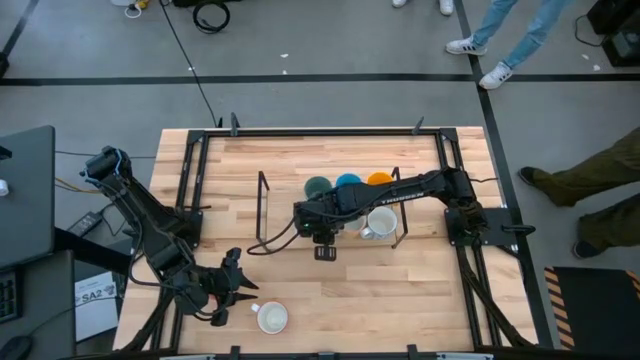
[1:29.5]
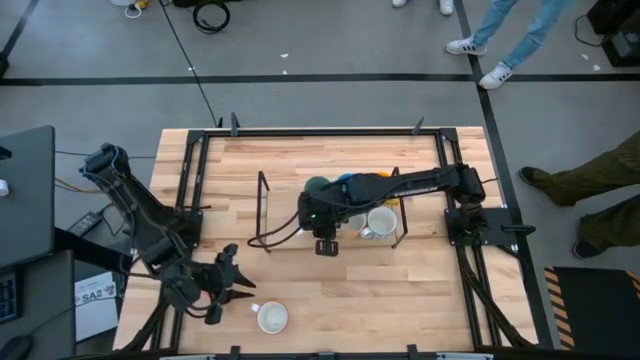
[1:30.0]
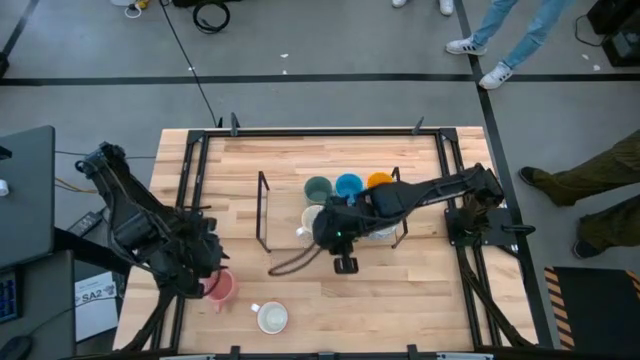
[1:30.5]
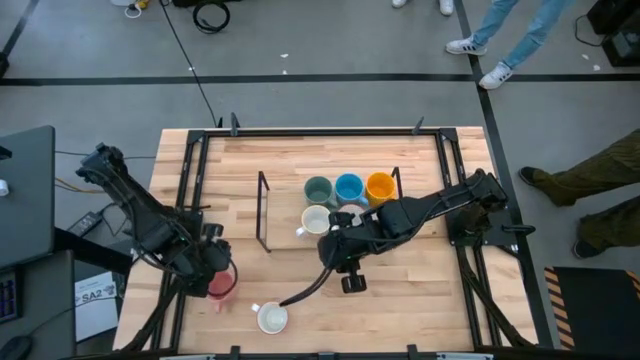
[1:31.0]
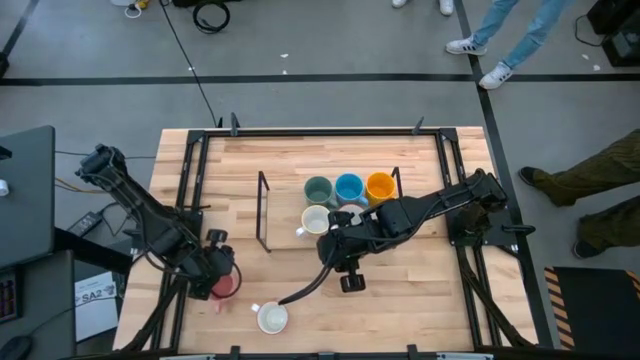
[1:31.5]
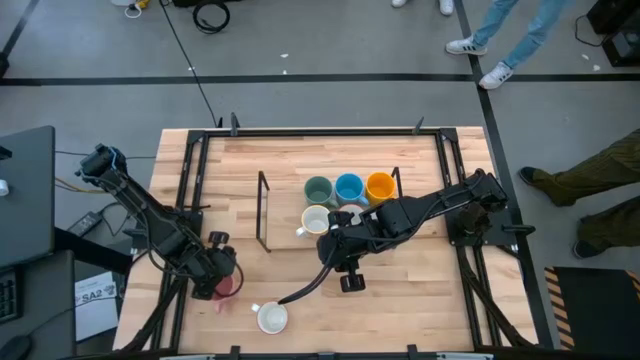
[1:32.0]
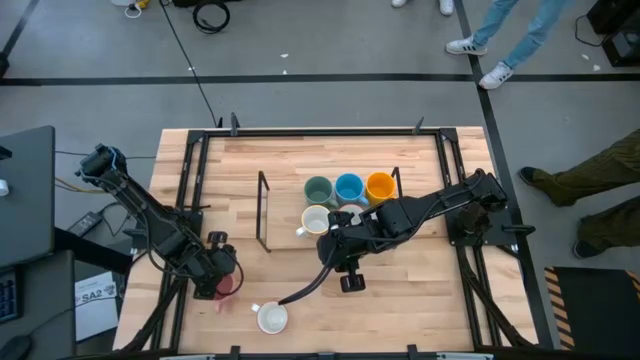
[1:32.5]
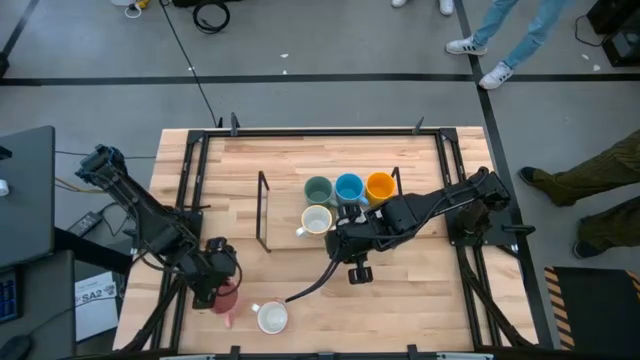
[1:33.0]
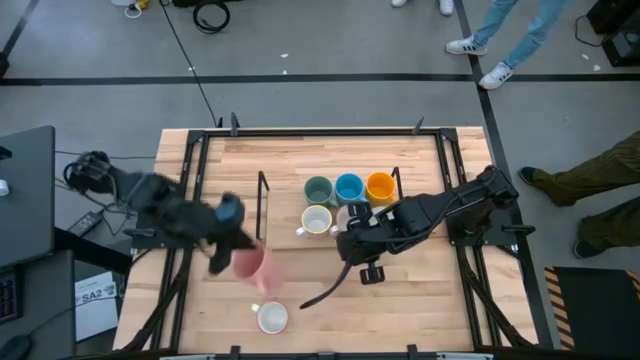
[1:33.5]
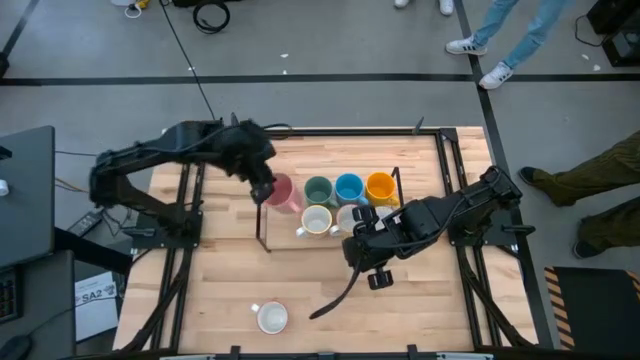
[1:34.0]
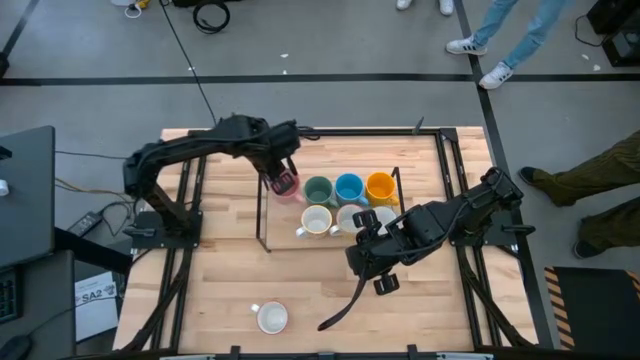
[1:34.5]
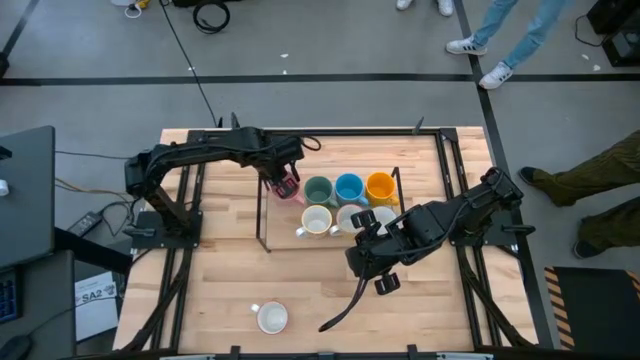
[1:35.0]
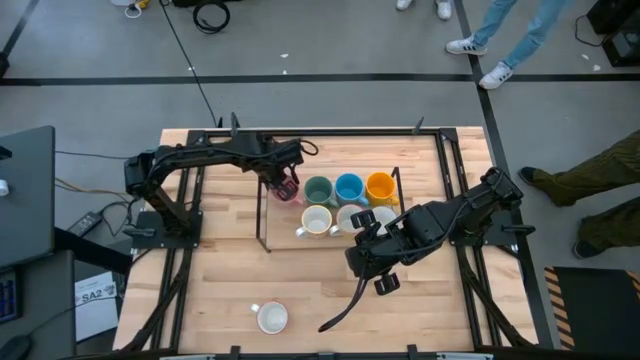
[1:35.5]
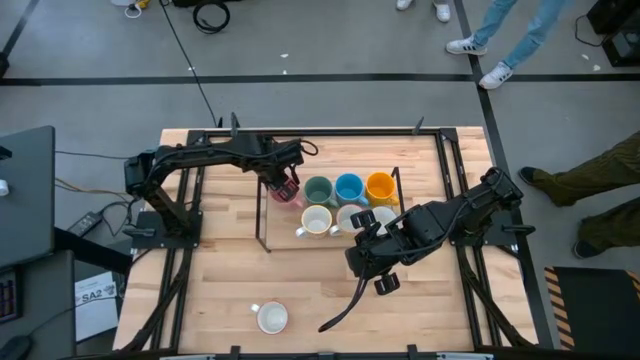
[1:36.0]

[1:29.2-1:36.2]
Task: Place coffee mugs
Put the pink mug on the shelf

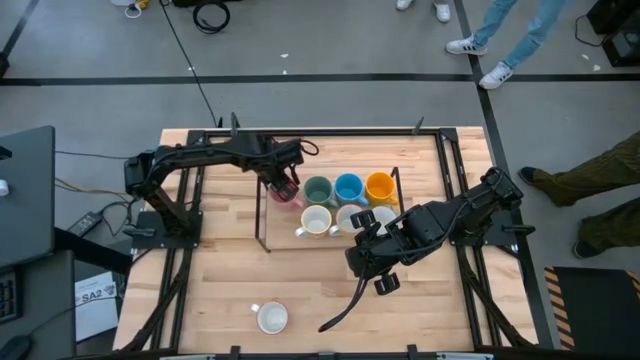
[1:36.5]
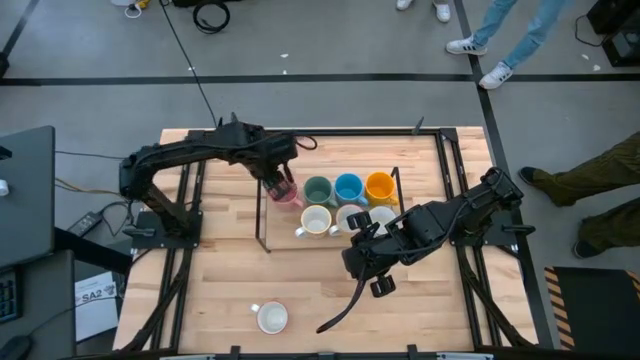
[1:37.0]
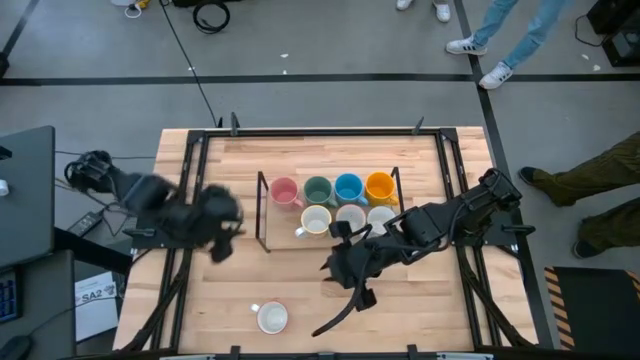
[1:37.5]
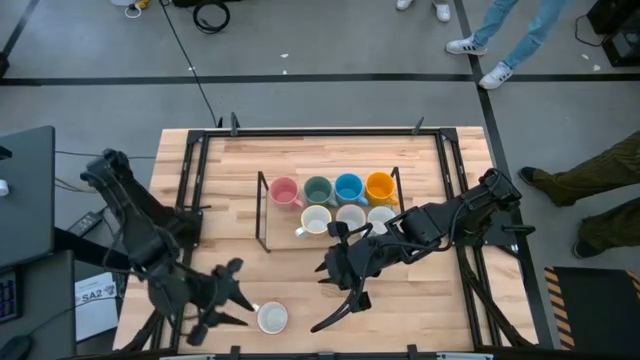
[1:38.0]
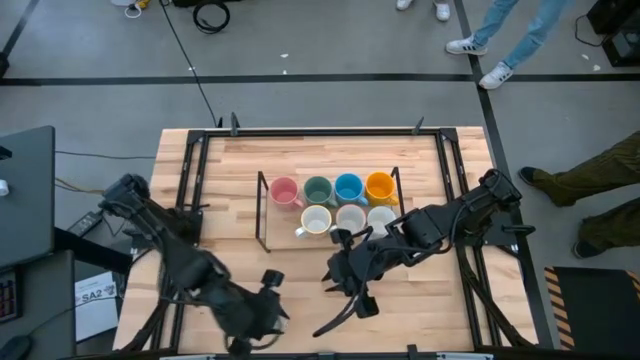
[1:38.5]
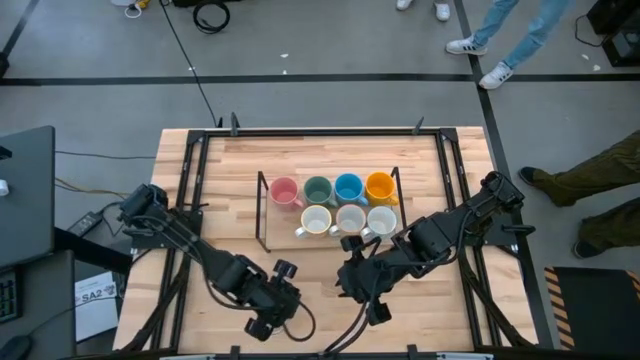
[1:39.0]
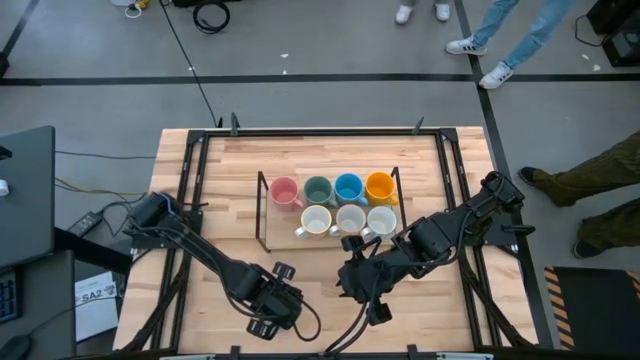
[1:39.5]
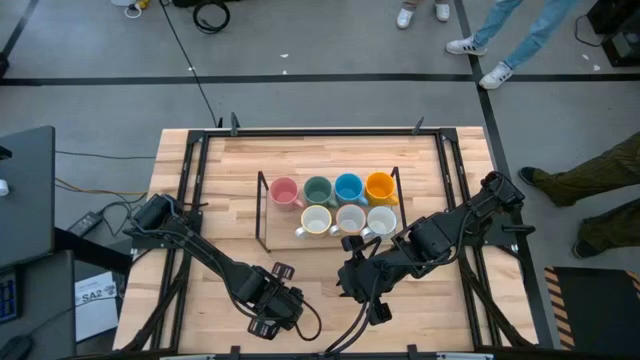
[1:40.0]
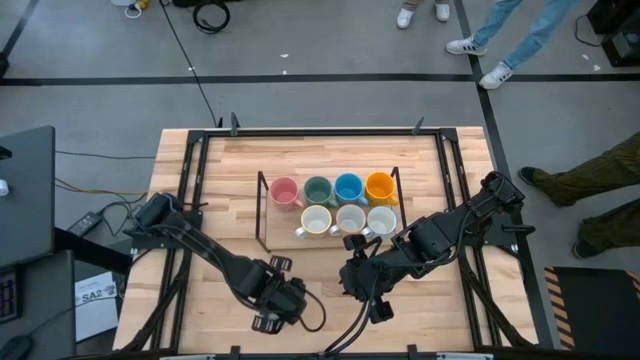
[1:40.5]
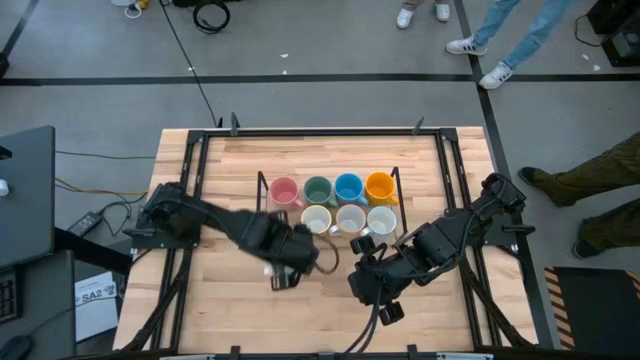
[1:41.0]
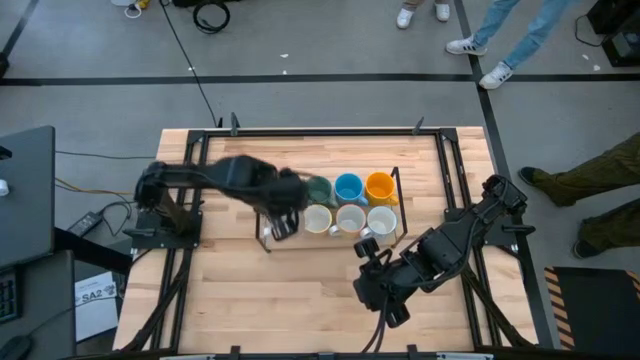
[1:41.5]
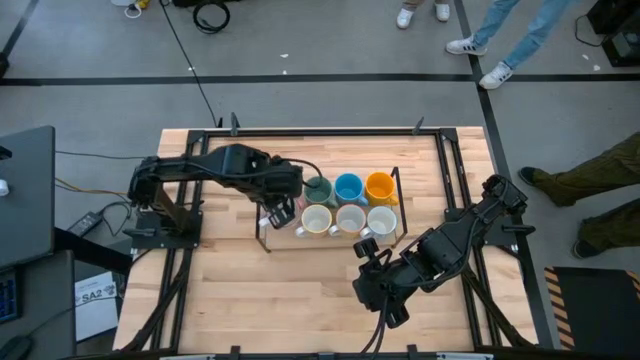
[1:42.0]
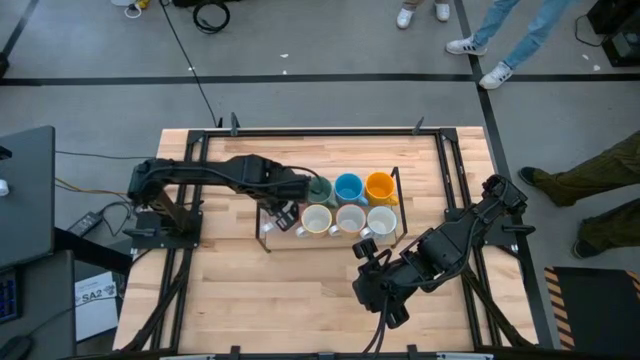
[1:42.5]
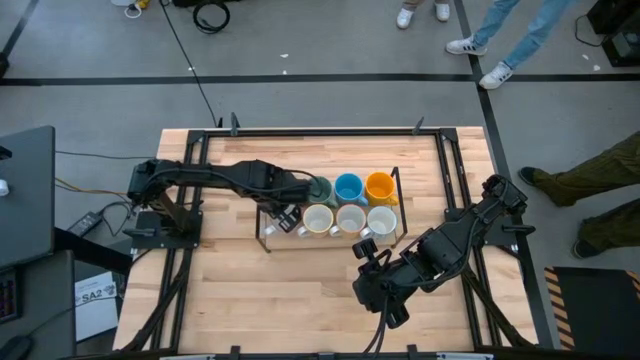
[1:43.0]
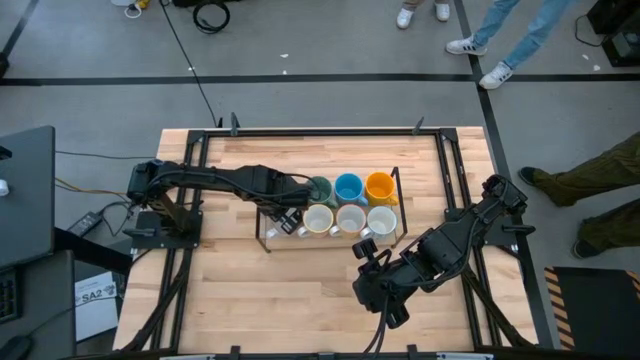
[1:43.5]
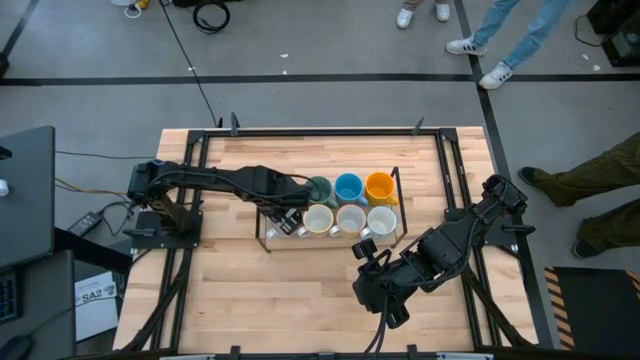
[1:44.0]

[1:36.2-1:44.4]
Put the gray white mug on the shelf

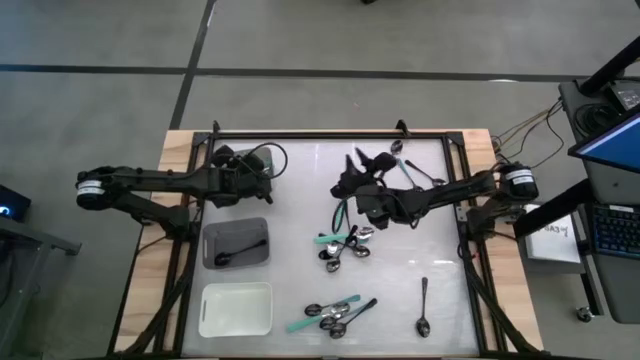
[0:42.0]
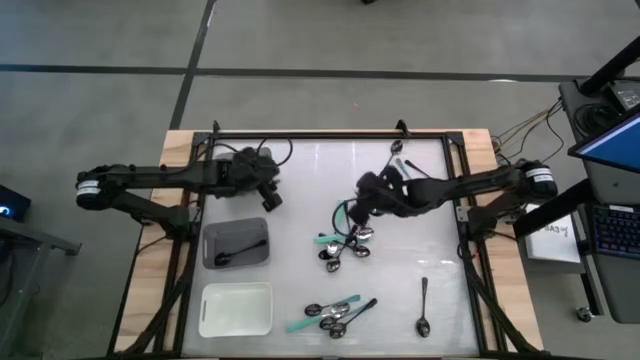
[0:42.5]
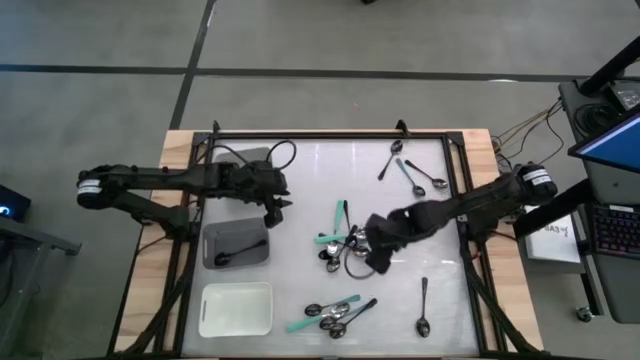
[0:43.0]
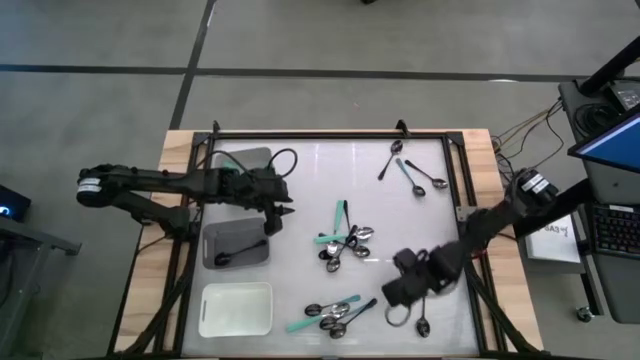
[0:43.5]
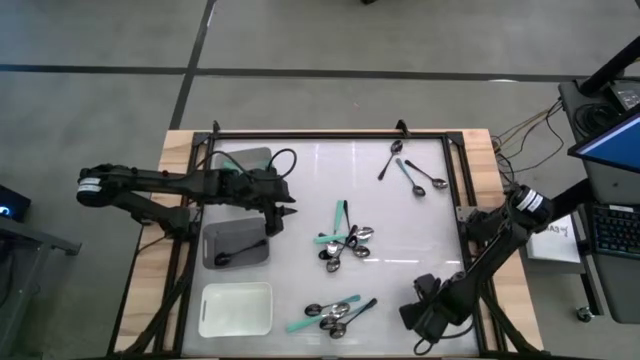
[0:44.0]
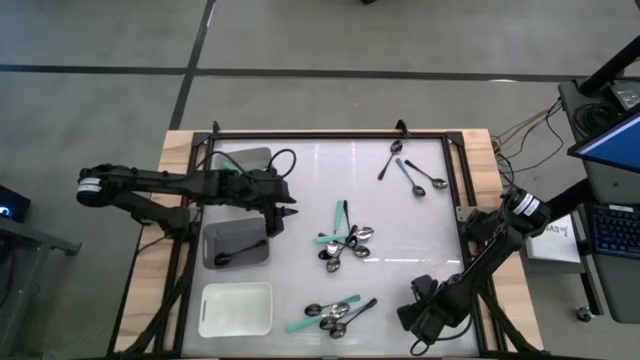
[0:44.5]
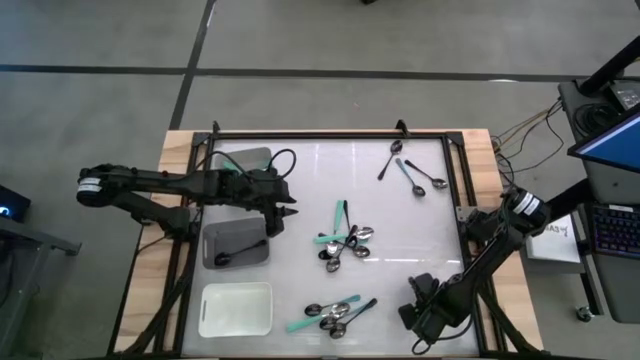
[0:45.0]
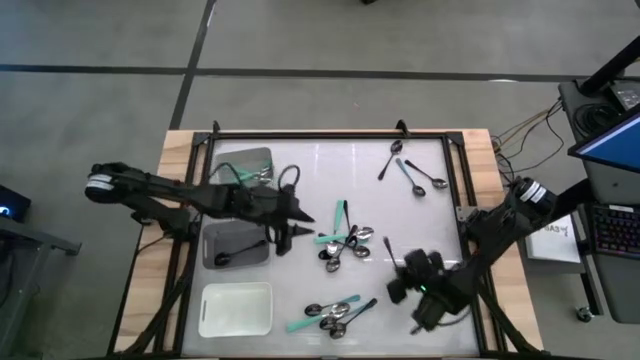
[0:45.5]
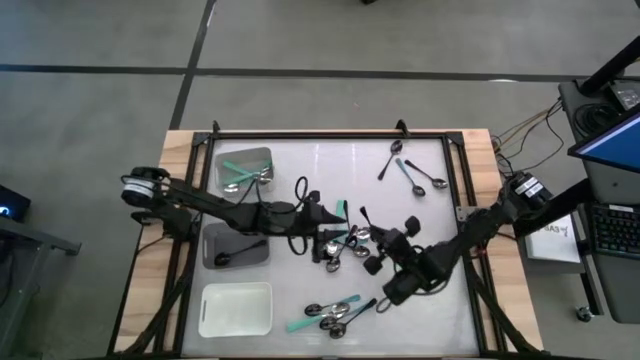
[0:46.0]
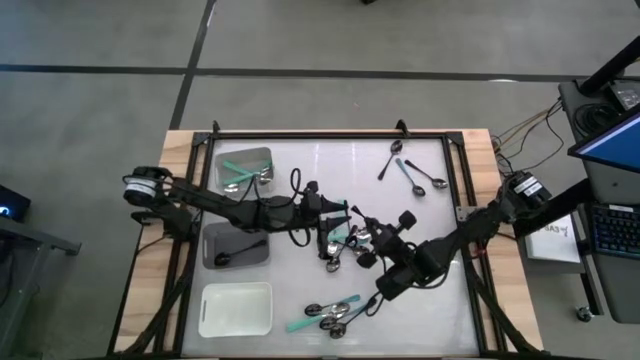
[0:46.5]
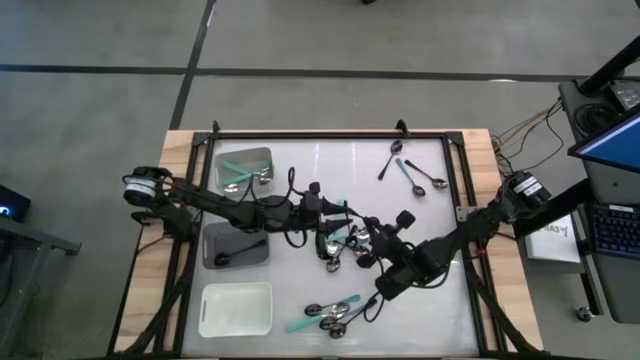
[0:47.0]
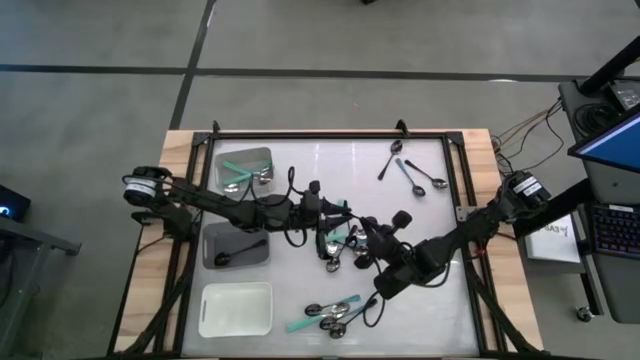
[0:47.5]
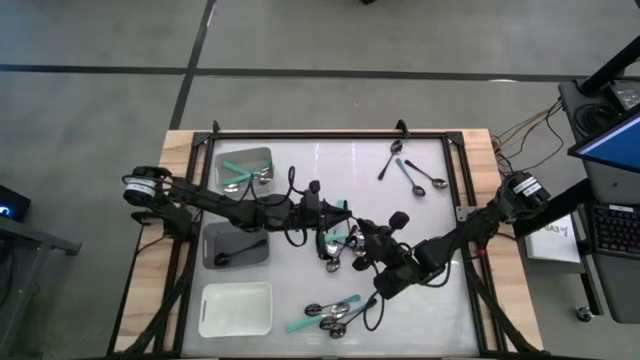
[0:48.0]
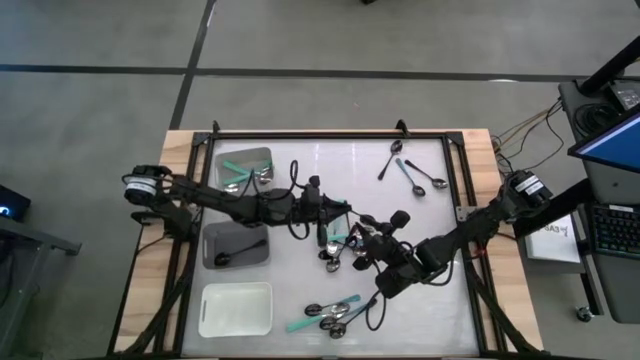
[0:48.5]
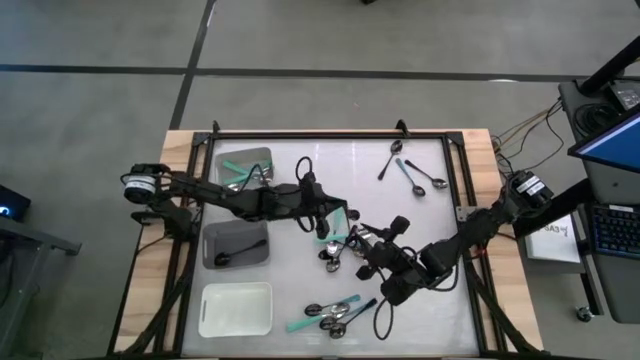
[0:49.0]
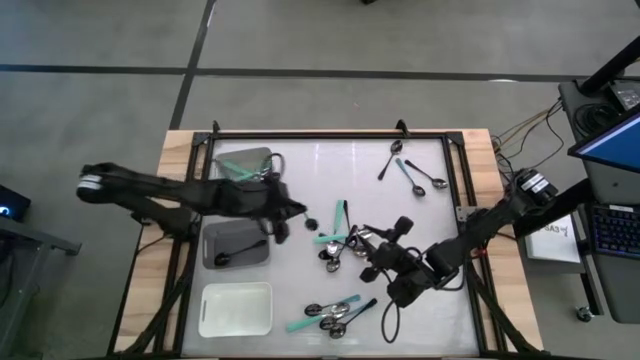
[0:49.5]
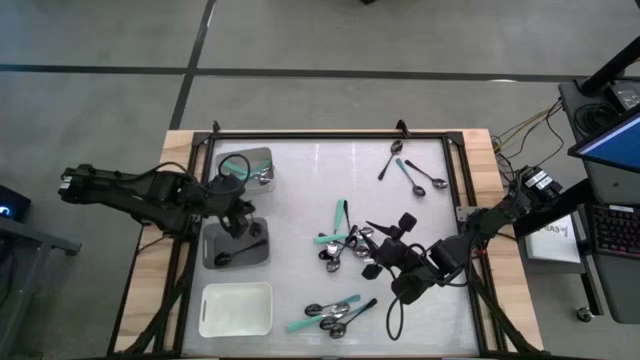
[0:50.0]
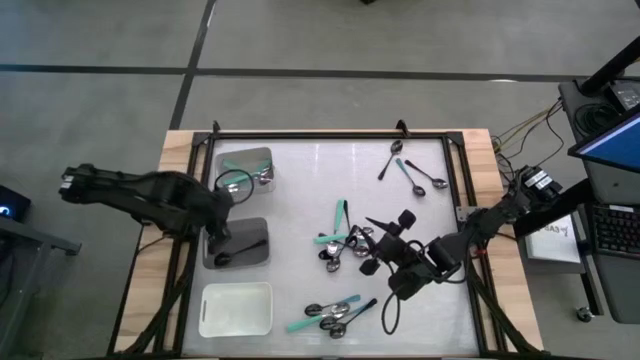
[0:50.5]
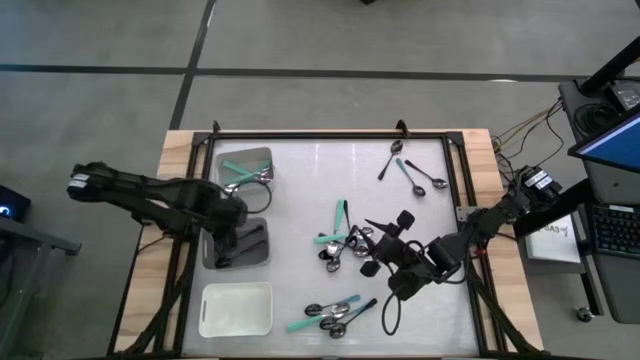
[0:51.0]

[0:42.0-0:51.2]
Task: Sort silverware by color (type)
Put the black spoon into the black bin
